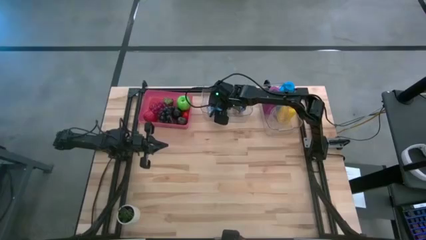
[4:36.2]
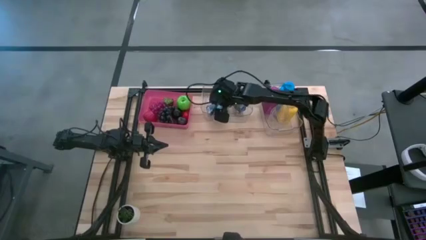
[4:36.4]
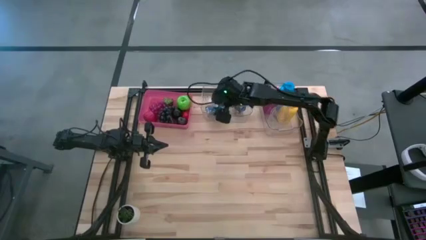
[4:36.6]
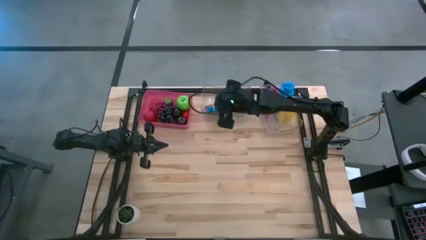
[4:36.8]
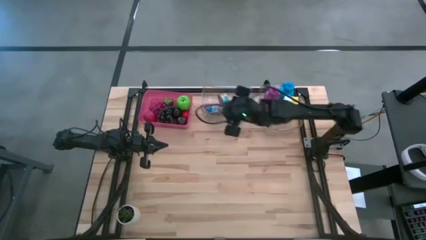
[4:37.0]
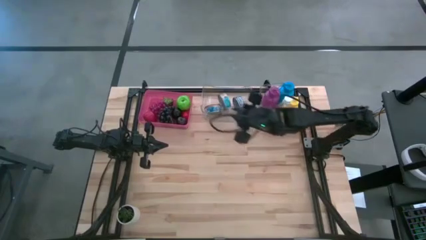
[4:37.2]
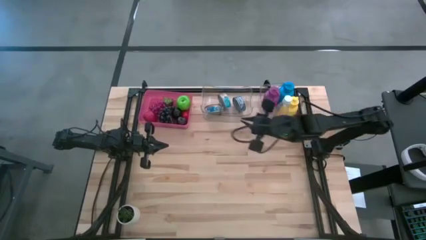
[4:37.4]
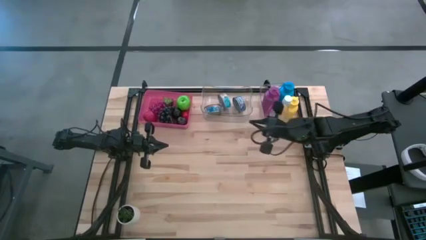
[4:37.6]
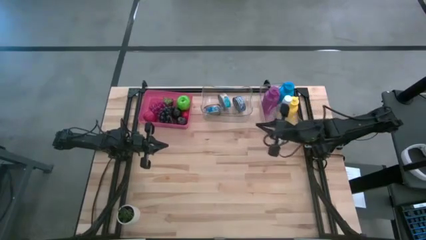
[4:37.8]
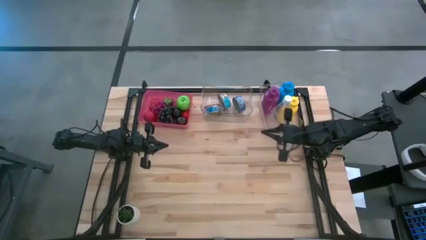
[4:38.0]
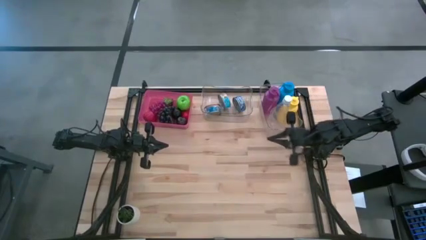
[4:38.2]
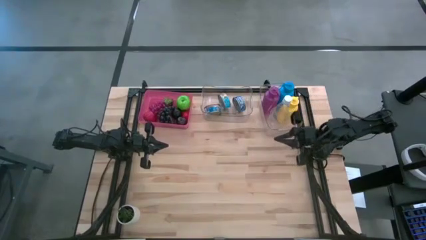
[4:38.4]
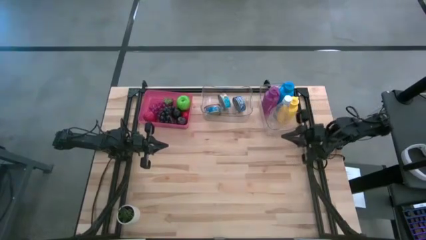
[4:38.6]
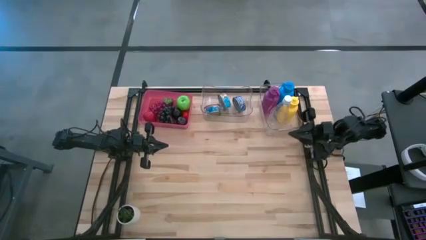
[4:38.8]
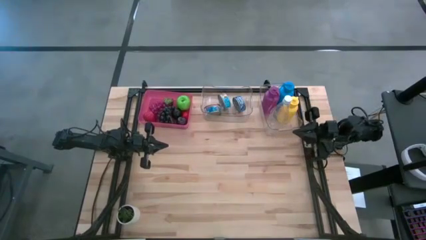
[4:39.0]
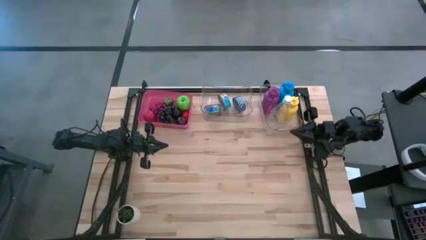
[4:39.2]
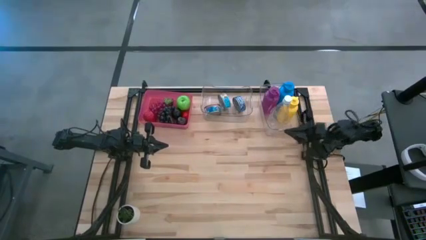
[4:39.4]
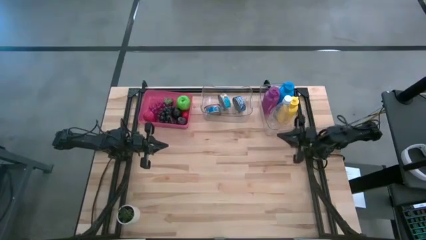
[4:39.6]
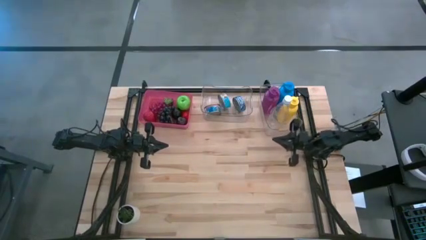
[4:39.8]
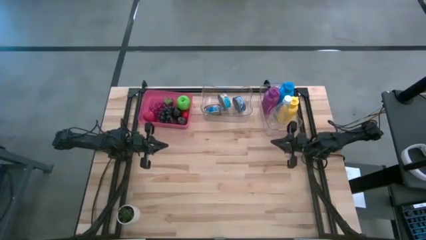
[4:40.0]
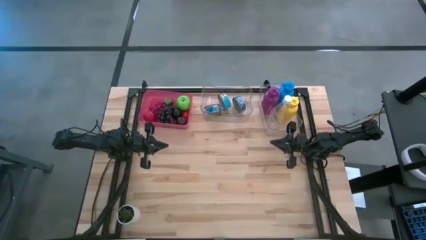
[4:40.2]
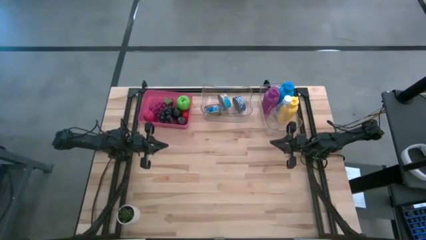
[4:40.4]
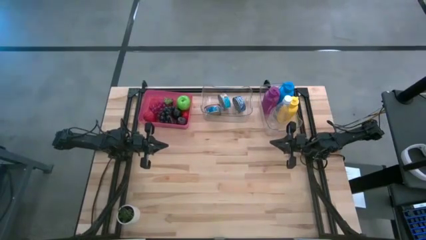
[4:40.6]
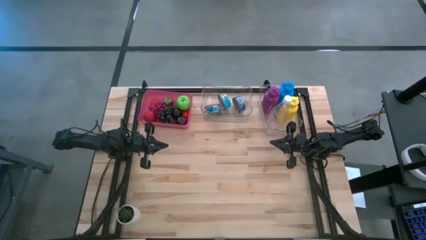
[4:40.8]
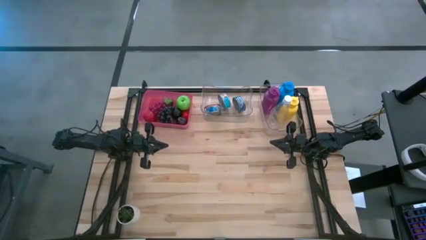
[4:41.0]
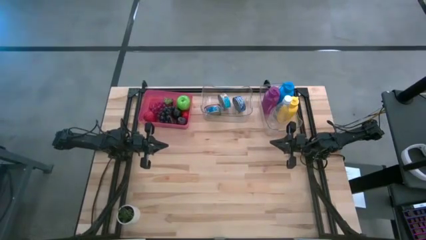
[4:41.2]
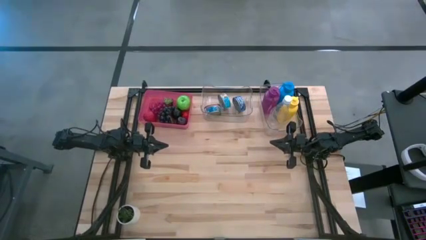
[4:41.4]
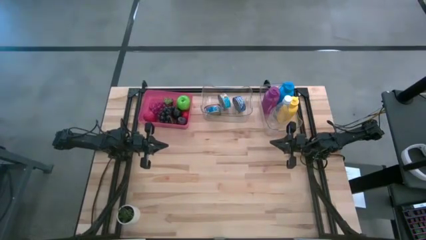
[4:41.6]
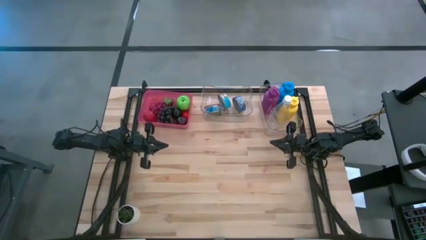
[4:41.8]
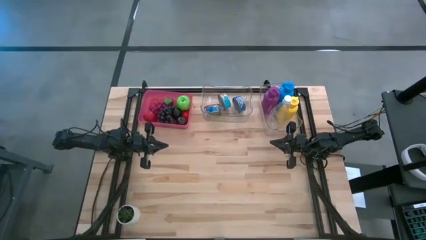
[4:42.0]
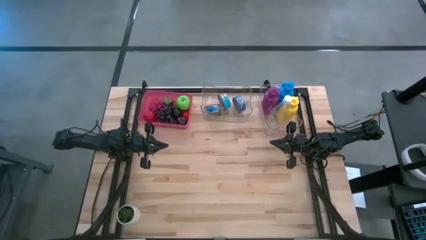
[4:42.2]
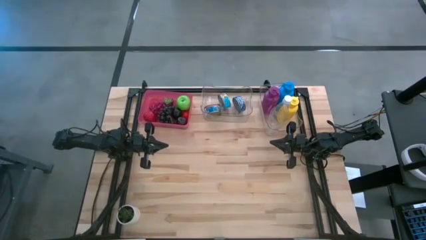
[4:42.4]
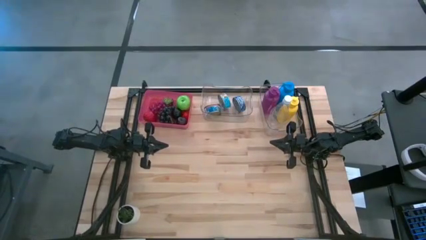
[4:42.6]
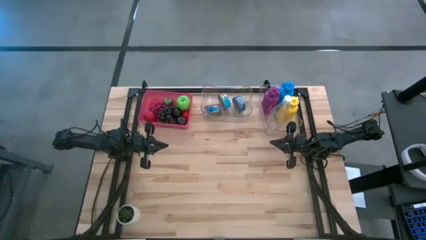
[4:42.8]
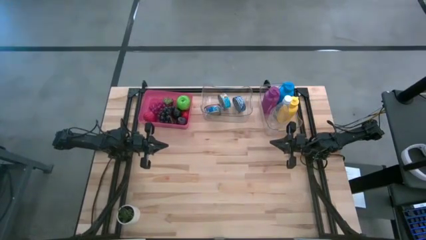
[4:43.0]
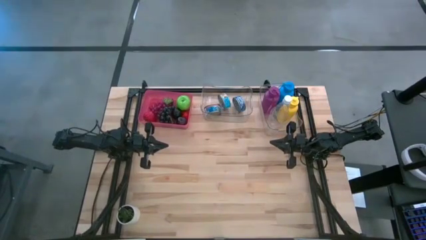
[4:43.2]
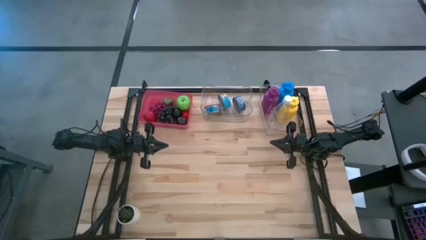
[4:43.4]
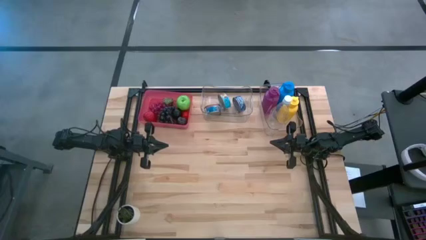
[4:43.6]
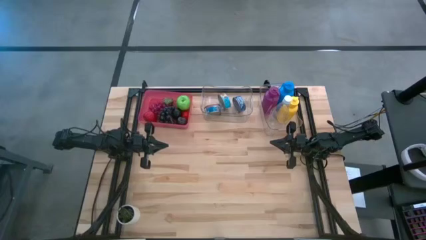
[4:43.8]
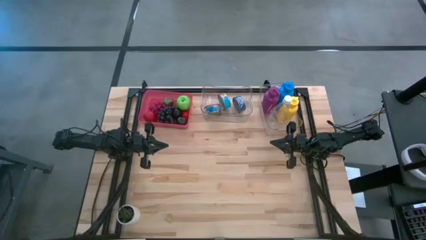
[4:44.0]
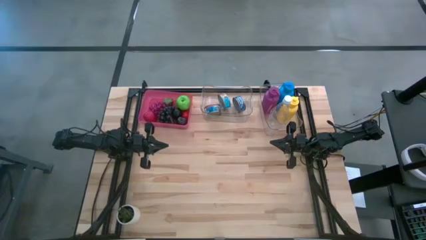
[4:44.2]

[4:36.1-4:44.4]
Task: Pick & Place Food Item
Return to Home Position

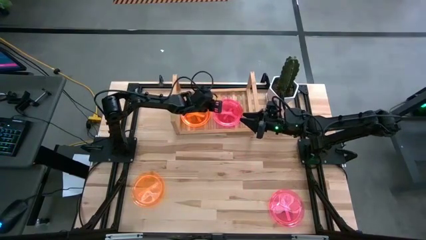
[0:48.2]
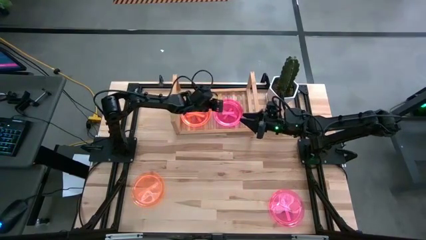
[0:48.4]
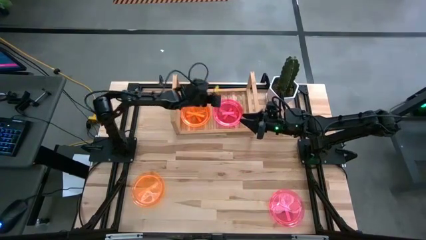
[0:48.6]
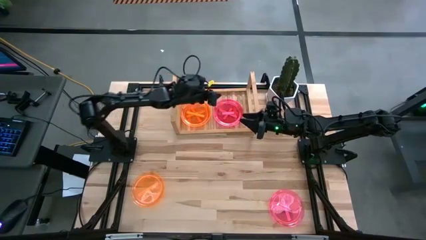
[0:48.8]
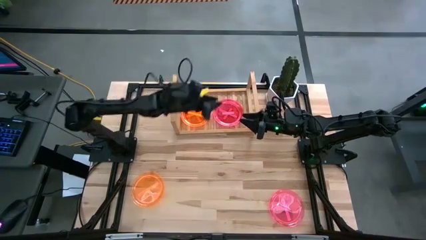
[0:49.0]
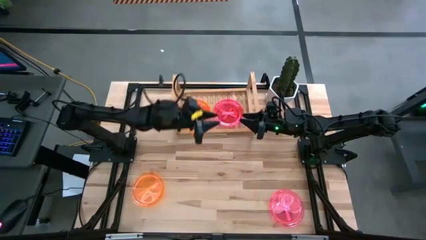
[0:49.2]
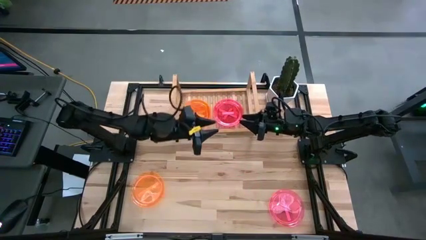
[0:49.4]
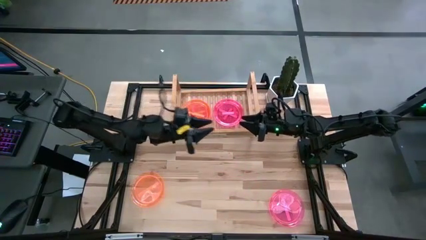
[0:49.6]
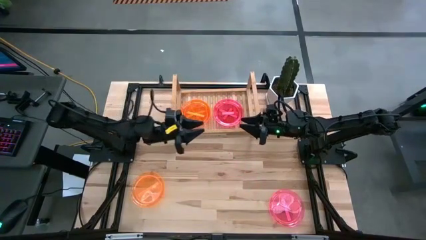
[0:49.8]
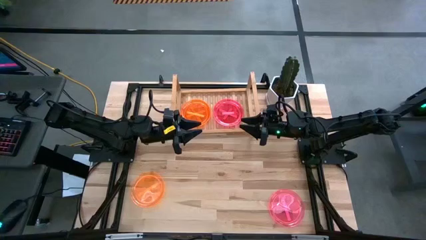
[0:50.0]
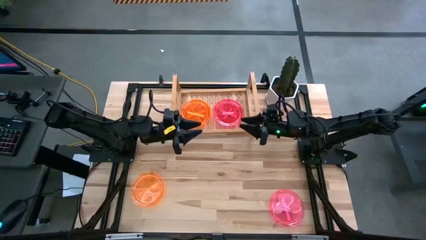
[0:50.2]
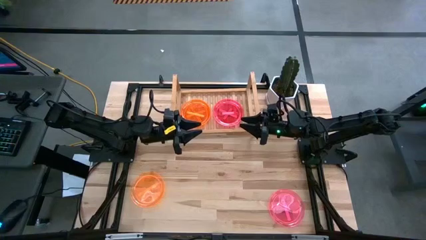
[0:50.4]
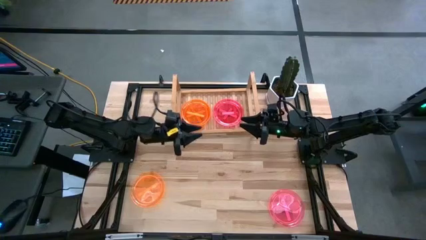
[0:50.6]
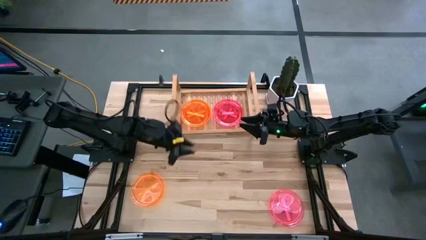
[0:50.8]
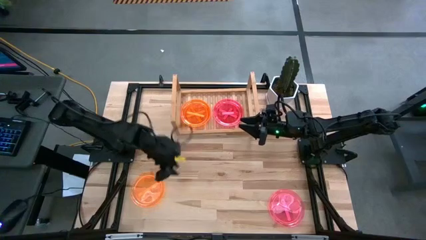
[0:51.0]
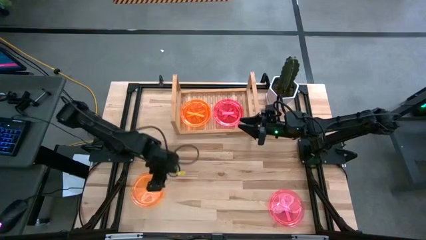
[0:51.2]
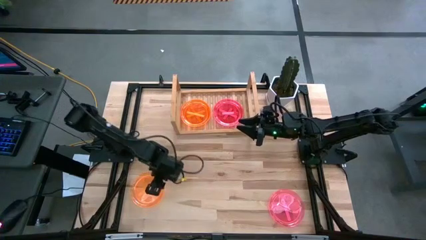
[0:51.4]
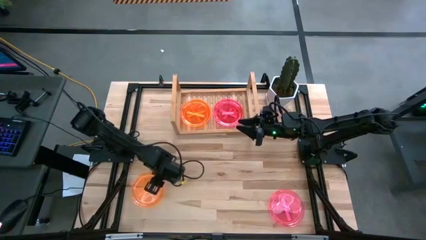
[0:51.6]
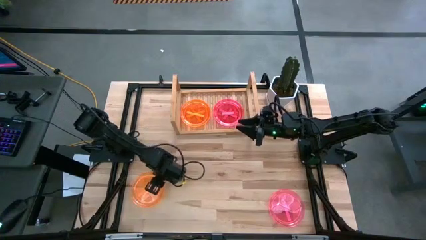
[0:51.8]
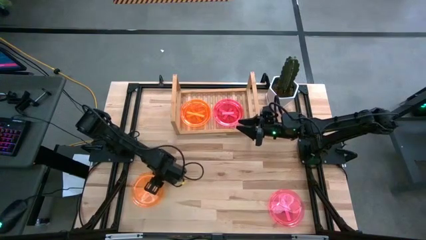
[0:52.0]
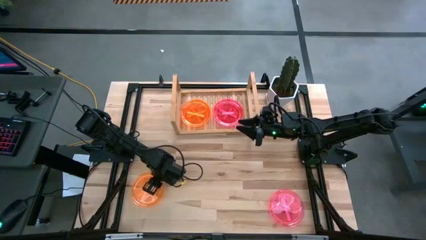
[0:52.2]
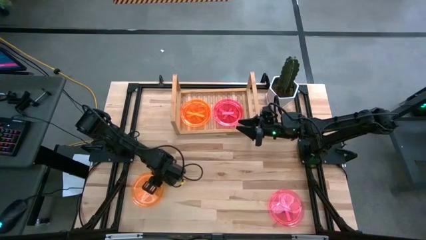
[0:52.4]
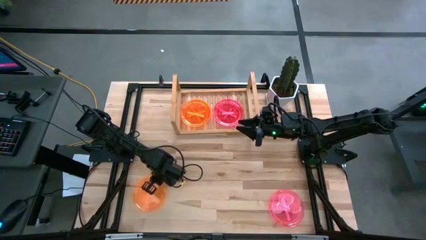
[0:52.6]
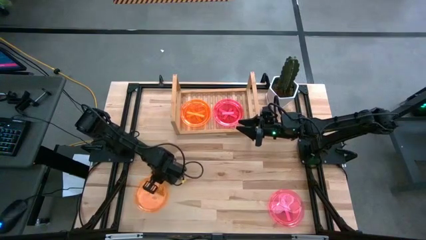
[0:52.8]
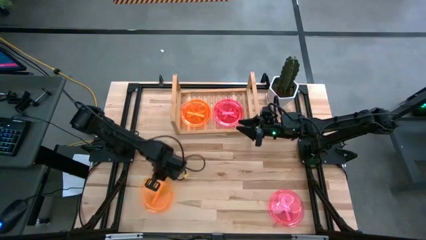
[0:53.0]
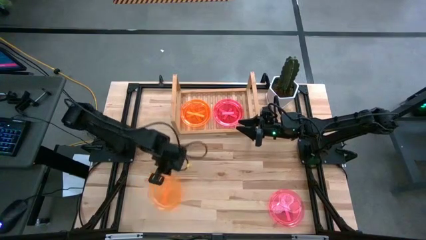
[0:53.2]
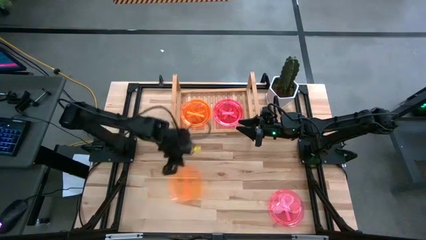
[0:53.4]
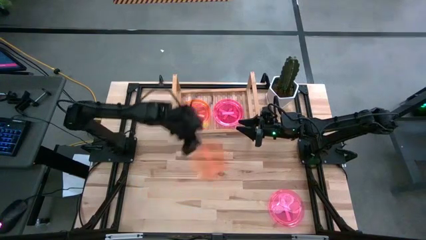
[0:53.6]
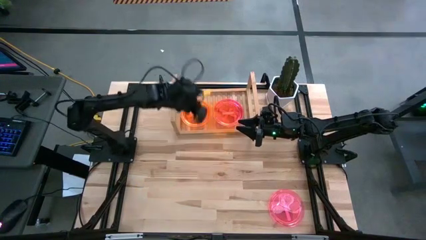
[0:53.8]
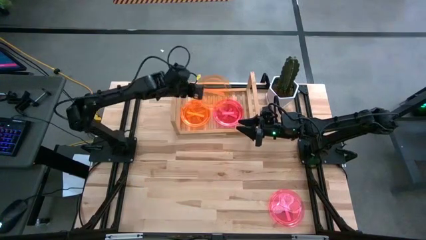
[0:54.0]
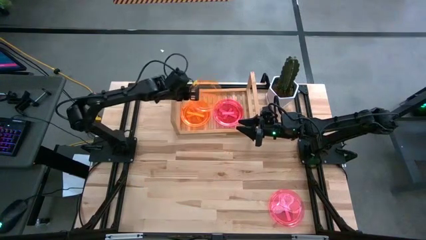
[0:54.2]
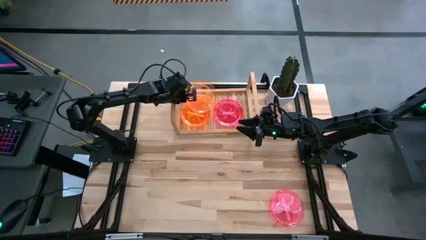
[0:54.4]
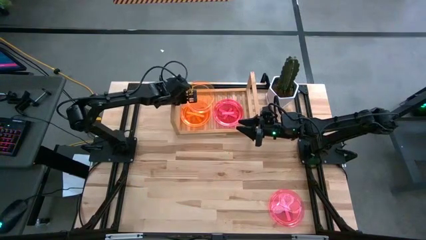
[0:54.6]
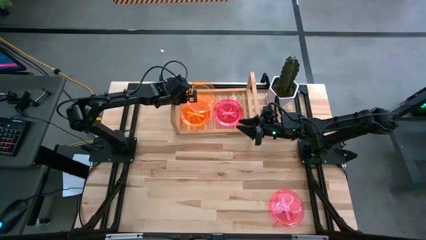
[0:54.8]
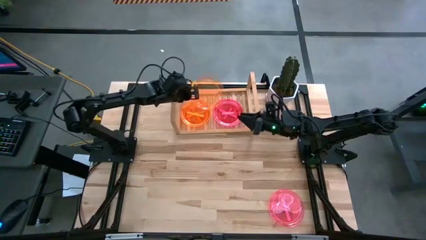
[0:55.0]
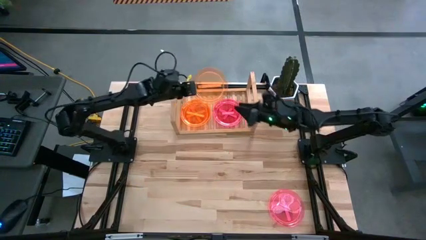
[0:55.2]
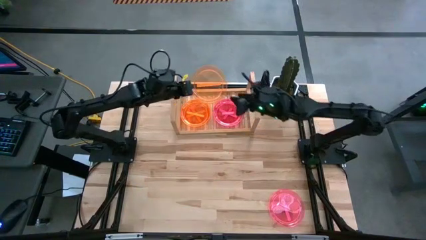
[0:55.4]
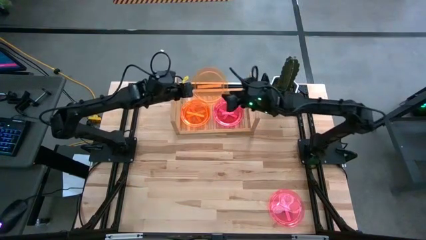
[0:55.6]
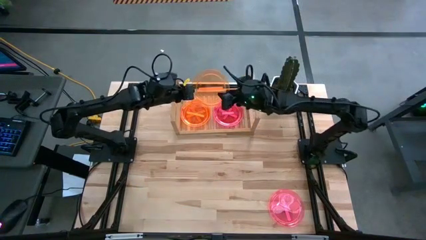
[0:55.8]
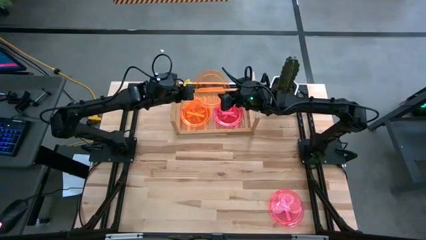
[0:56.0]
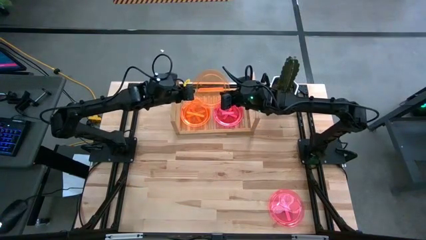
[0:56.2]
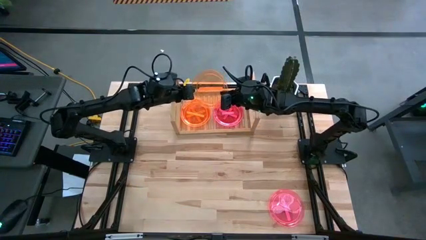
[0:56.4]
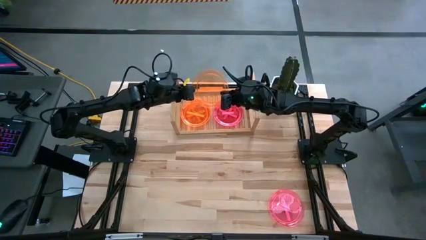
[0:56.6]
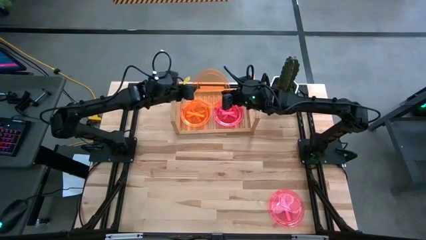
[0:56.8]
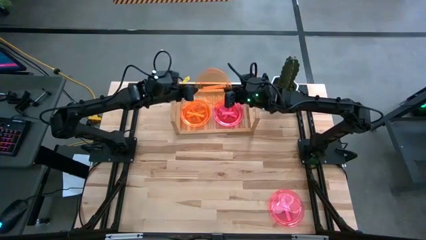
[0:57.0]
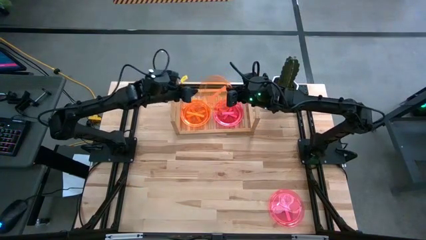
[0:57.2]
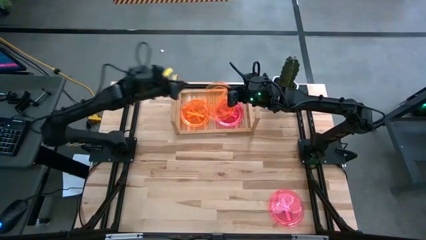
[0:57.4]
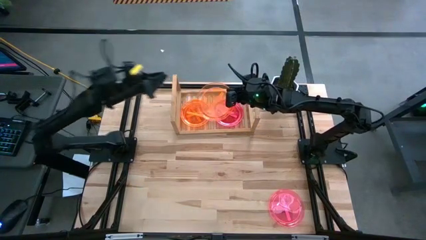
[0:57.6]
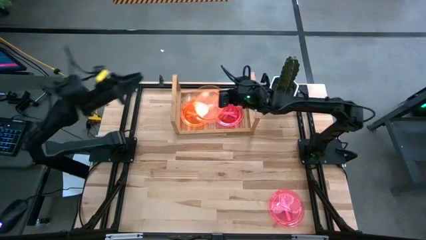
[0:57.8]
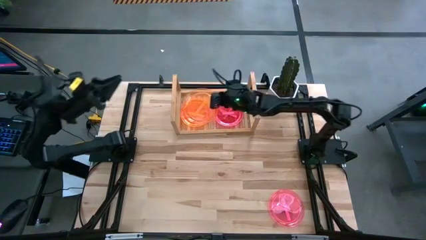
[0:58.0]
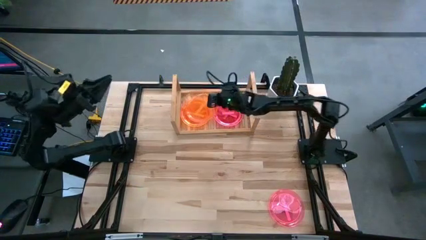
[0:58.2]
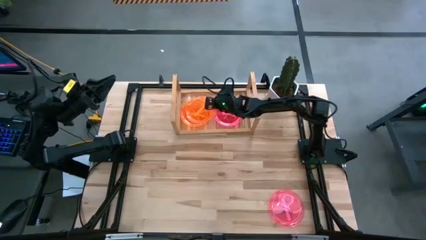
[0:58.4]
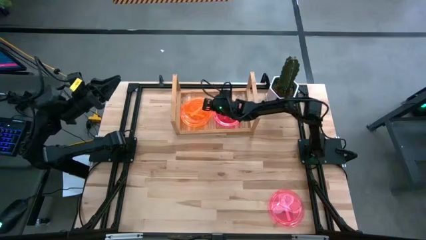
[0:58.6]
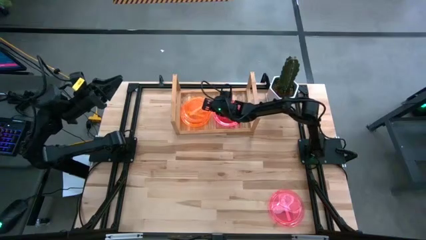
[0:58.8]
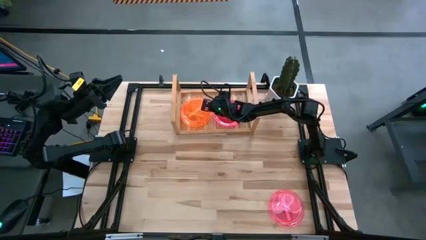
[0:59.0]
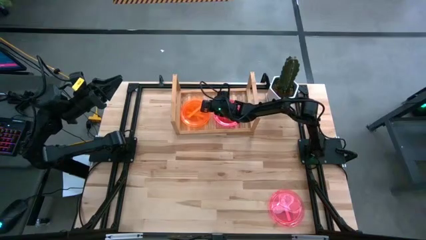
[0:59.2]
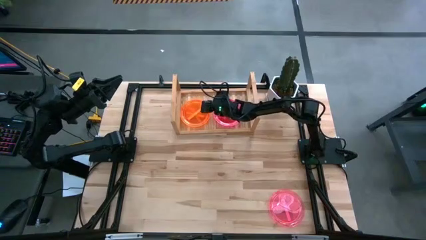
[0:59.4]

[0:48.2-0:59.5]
Task: Place and stack plates onto a shelf
Stack the orange plate on top of the orange plate
